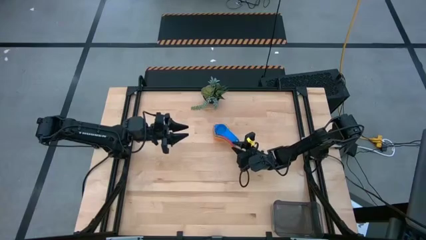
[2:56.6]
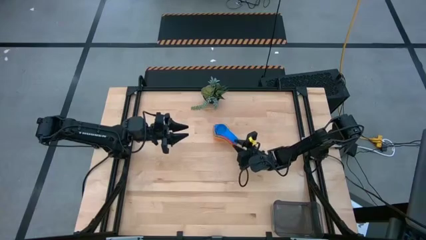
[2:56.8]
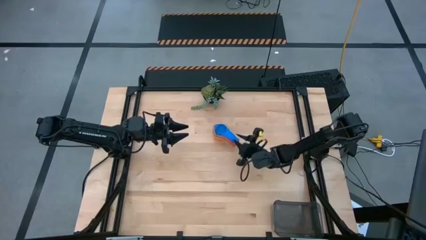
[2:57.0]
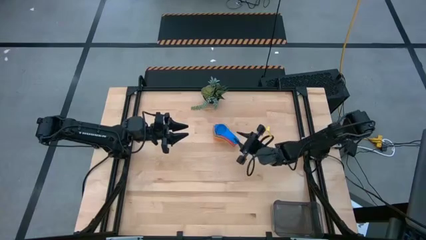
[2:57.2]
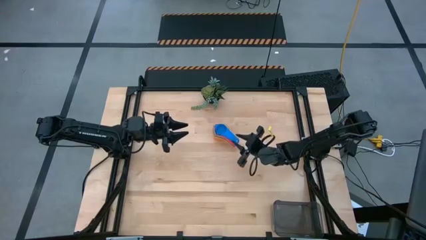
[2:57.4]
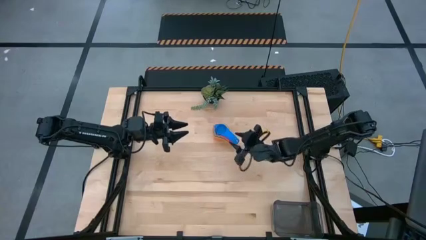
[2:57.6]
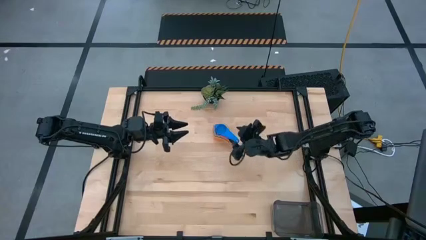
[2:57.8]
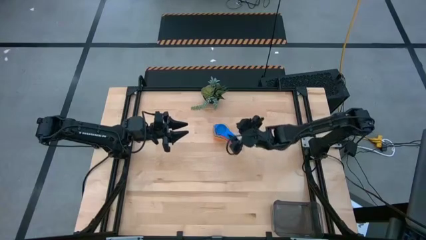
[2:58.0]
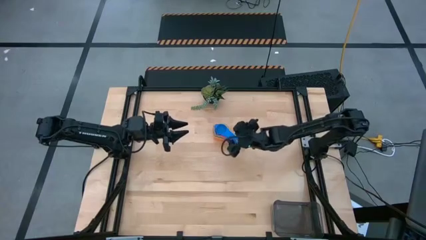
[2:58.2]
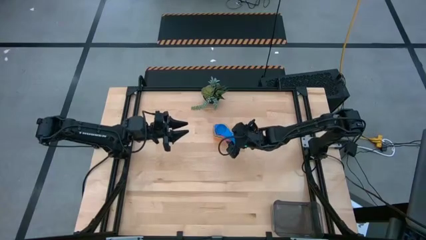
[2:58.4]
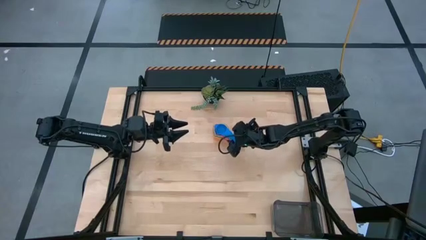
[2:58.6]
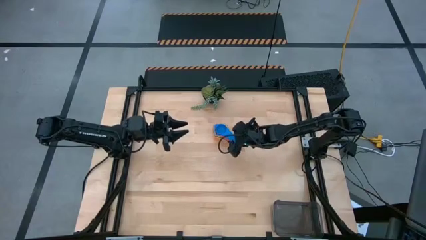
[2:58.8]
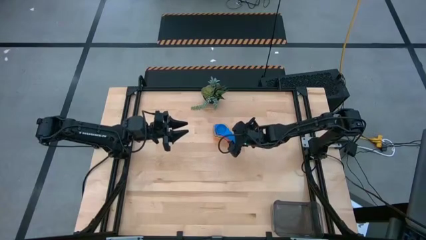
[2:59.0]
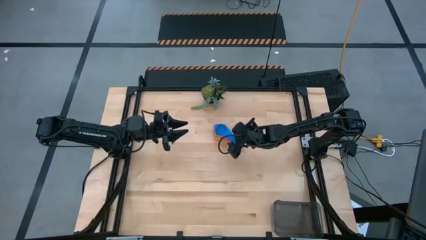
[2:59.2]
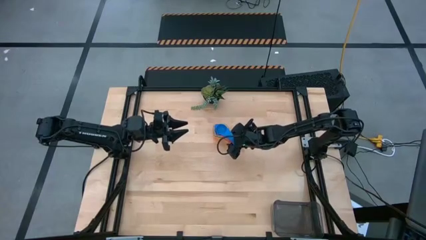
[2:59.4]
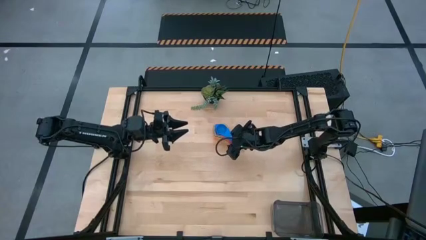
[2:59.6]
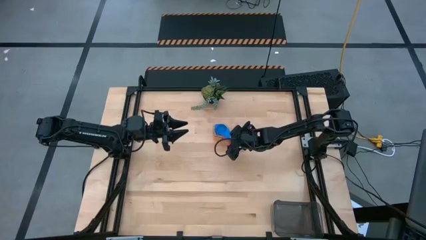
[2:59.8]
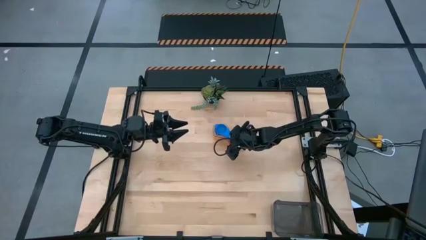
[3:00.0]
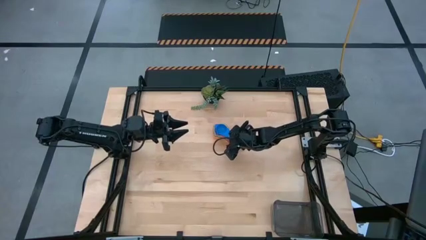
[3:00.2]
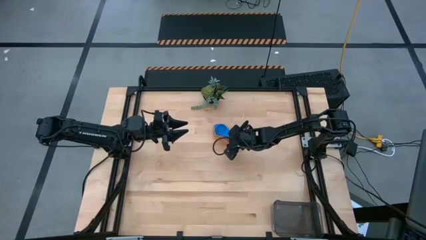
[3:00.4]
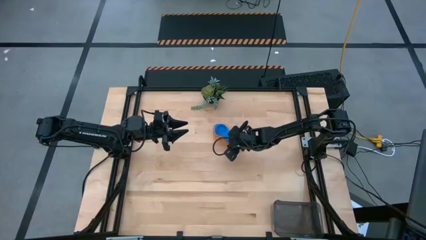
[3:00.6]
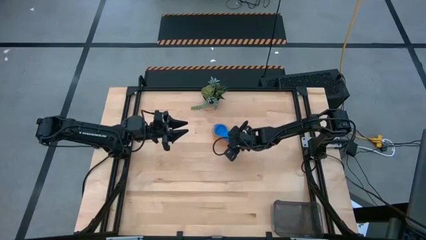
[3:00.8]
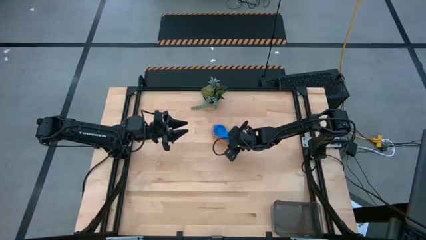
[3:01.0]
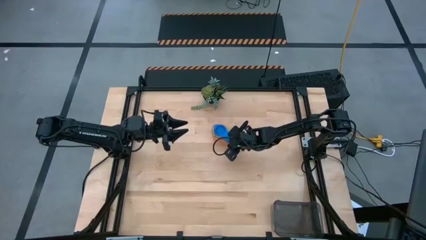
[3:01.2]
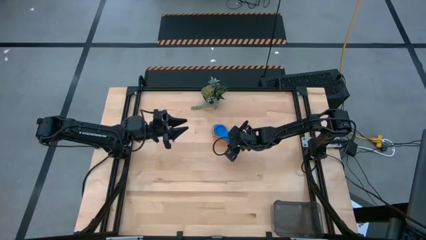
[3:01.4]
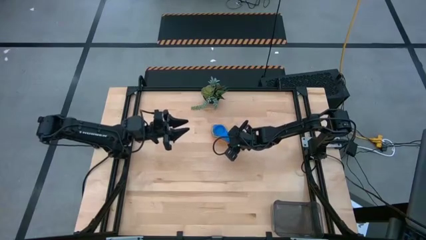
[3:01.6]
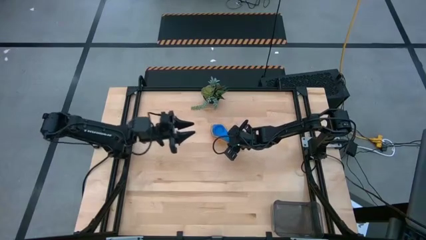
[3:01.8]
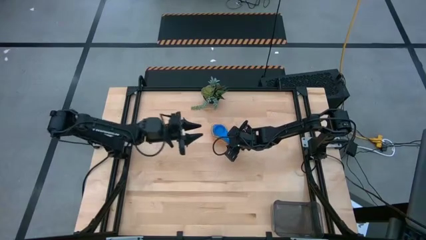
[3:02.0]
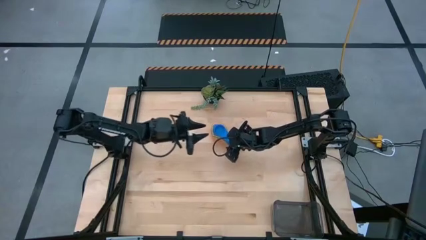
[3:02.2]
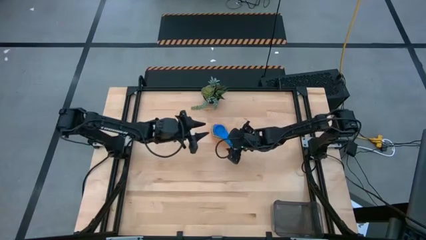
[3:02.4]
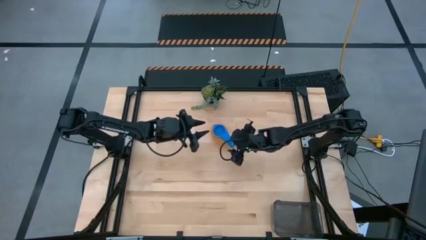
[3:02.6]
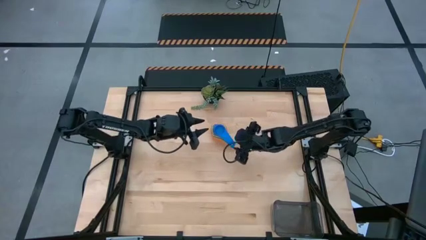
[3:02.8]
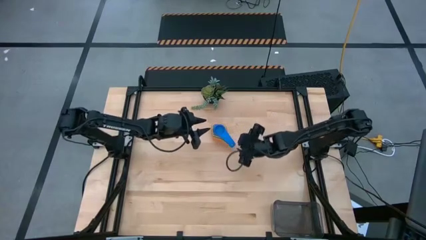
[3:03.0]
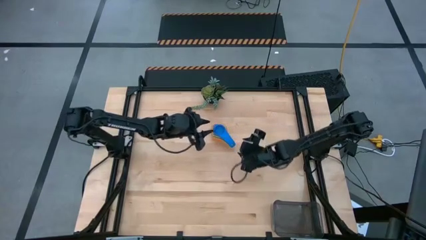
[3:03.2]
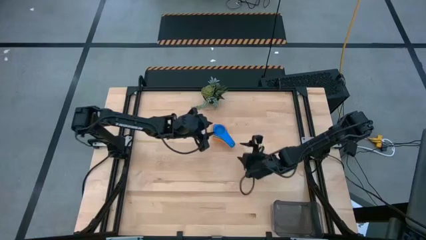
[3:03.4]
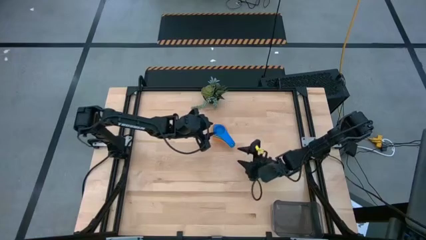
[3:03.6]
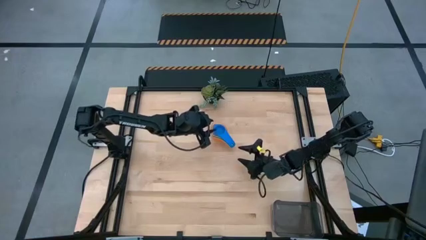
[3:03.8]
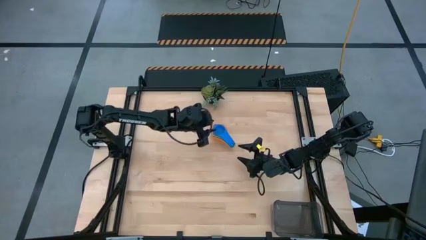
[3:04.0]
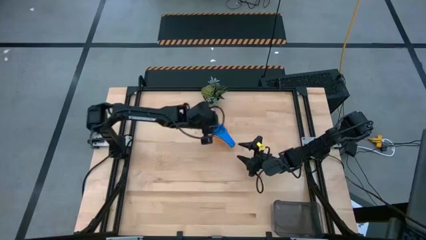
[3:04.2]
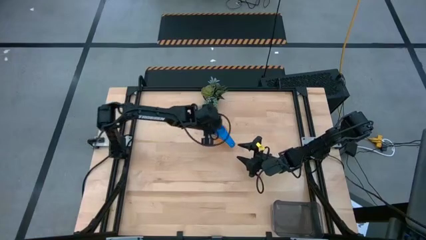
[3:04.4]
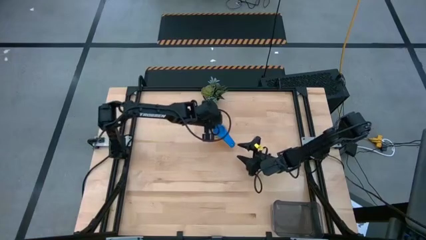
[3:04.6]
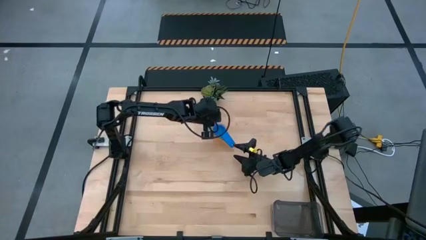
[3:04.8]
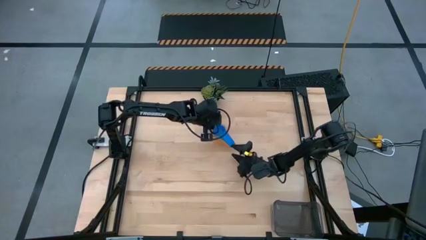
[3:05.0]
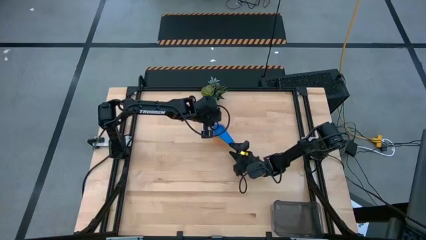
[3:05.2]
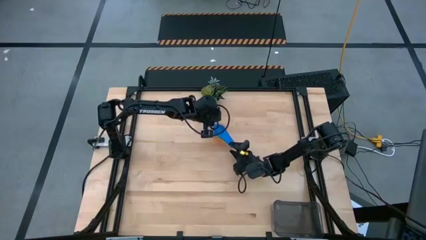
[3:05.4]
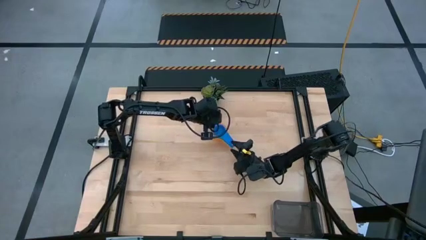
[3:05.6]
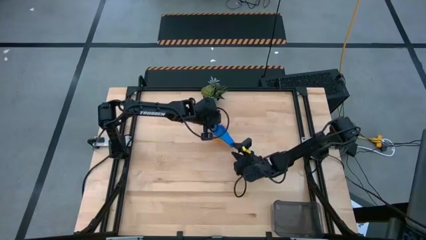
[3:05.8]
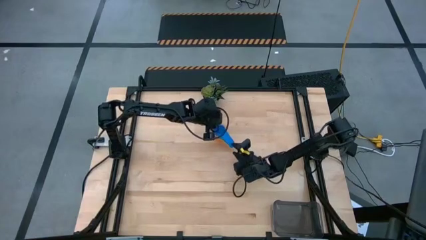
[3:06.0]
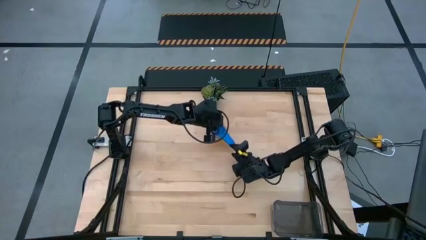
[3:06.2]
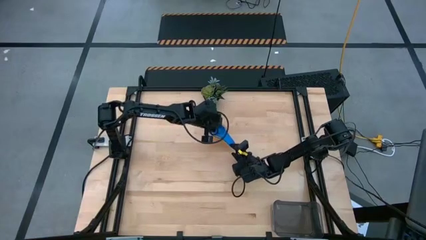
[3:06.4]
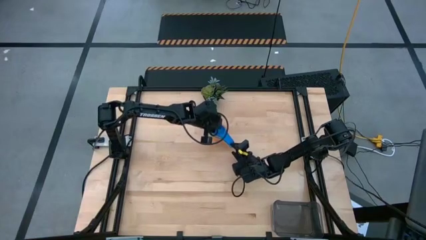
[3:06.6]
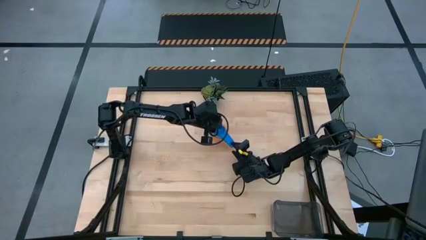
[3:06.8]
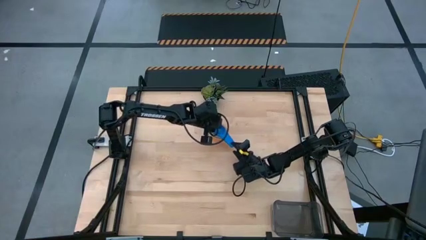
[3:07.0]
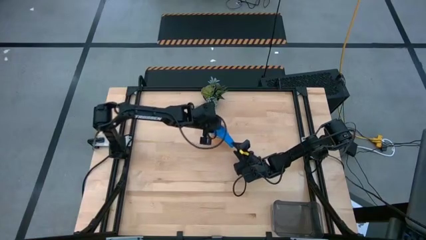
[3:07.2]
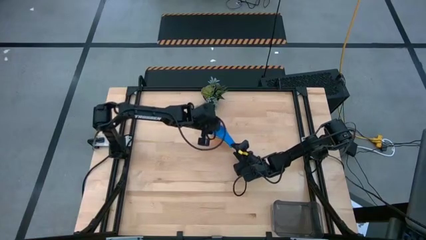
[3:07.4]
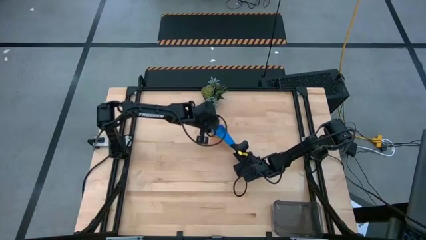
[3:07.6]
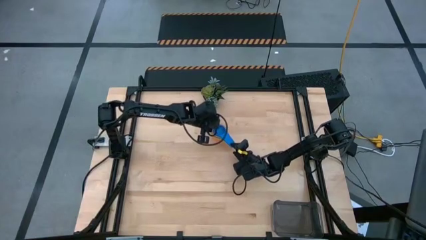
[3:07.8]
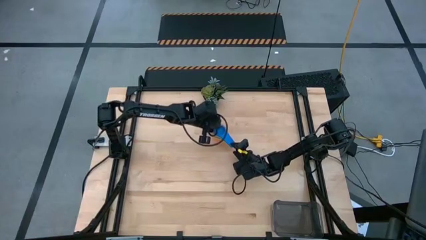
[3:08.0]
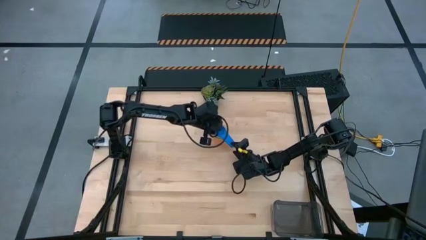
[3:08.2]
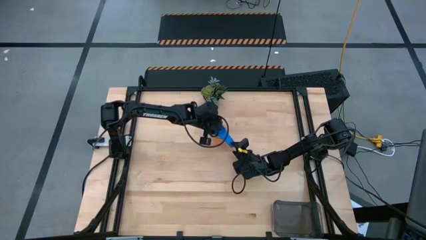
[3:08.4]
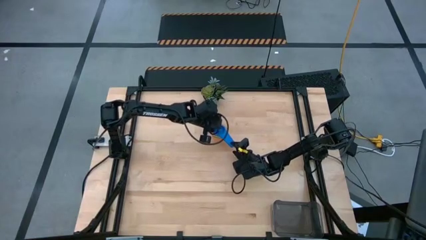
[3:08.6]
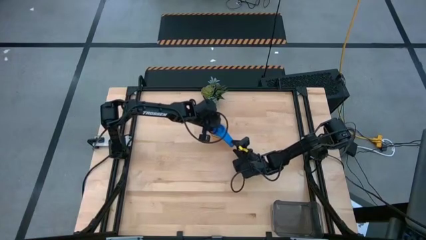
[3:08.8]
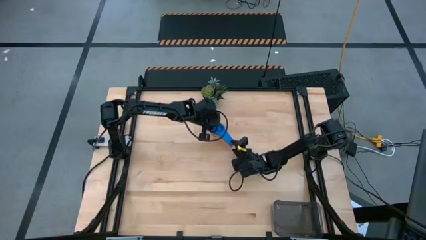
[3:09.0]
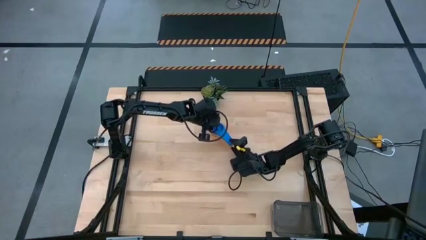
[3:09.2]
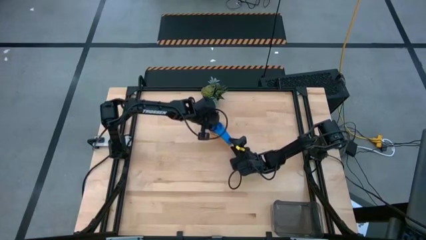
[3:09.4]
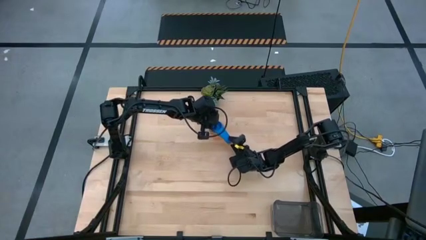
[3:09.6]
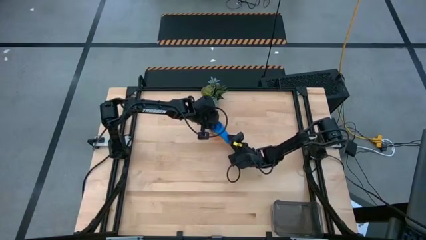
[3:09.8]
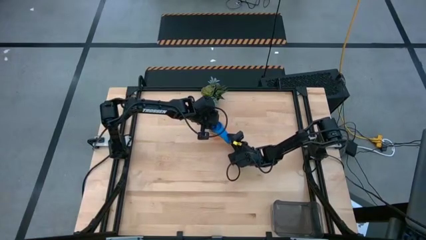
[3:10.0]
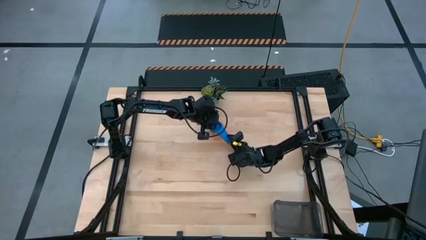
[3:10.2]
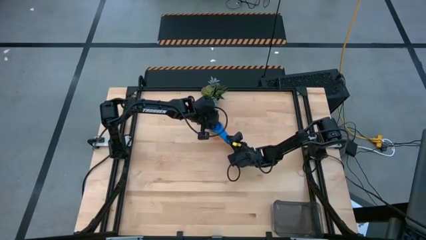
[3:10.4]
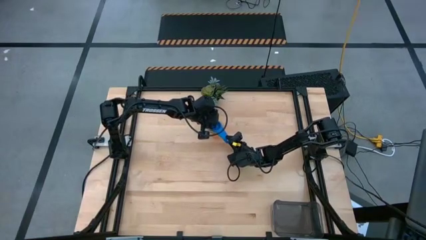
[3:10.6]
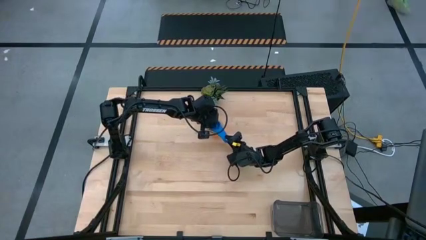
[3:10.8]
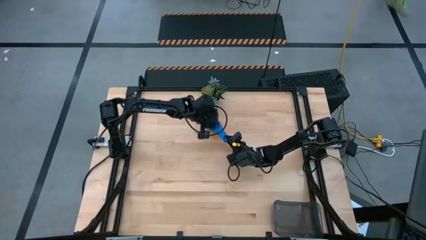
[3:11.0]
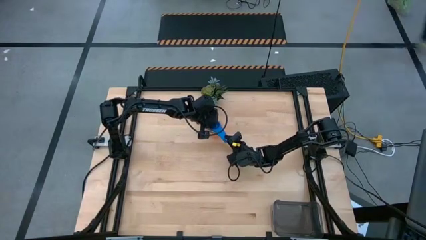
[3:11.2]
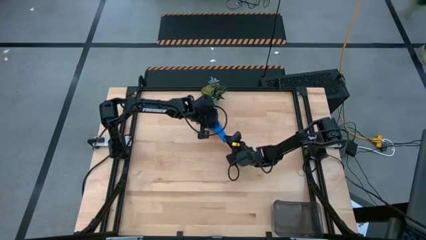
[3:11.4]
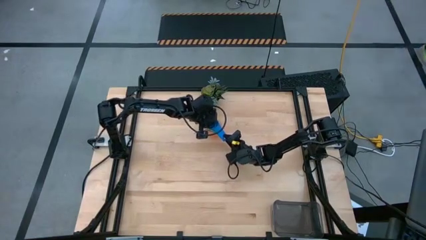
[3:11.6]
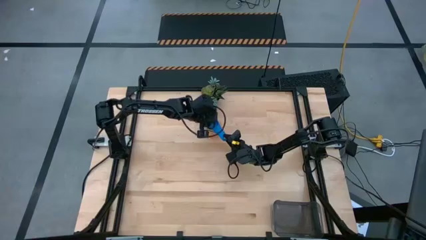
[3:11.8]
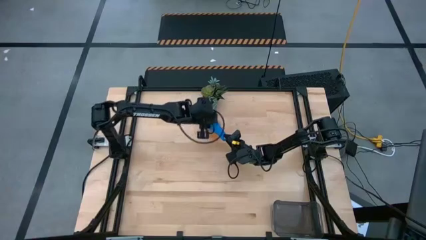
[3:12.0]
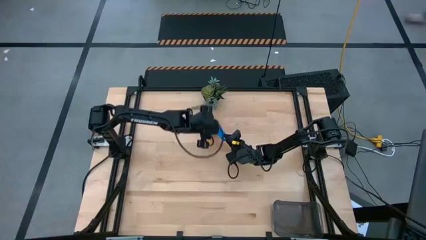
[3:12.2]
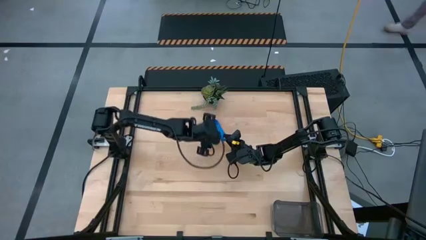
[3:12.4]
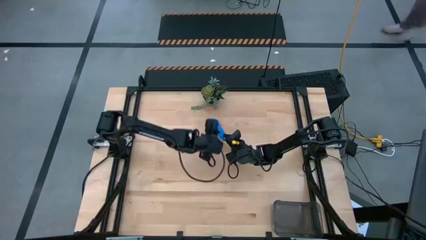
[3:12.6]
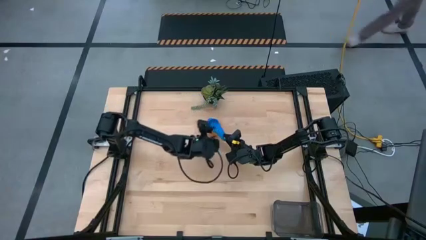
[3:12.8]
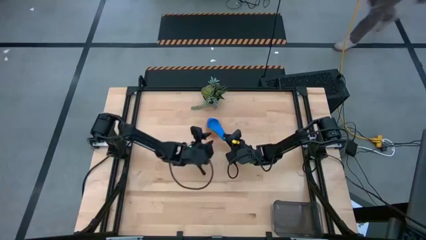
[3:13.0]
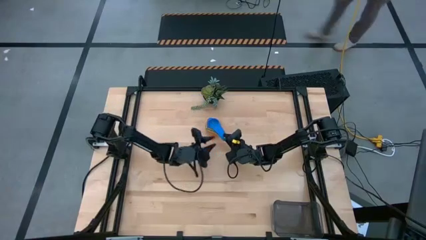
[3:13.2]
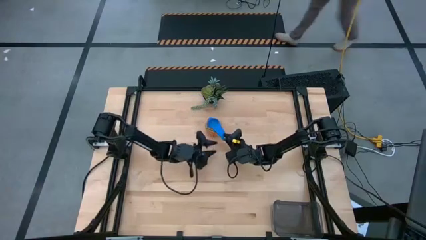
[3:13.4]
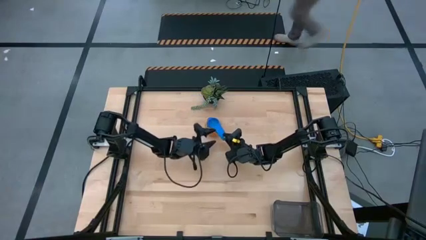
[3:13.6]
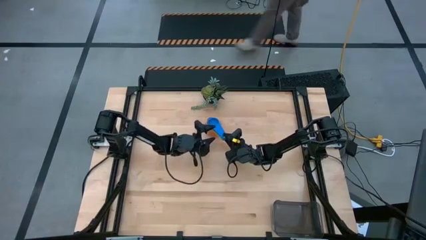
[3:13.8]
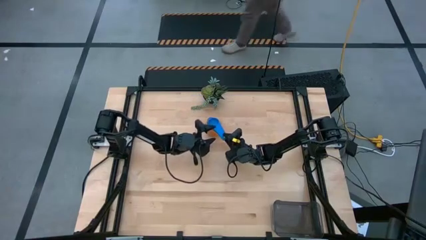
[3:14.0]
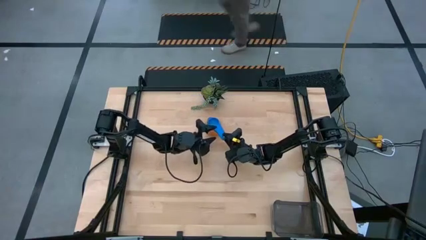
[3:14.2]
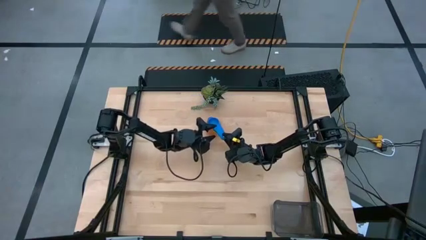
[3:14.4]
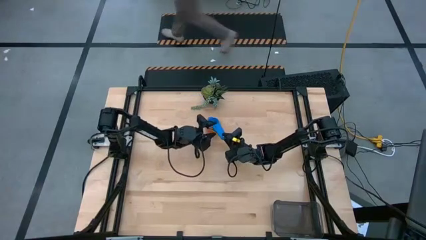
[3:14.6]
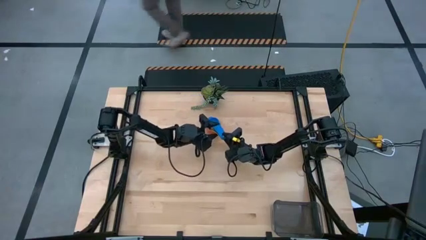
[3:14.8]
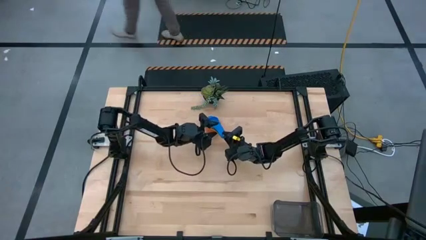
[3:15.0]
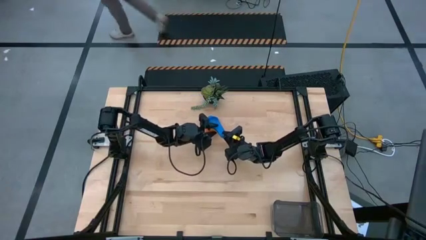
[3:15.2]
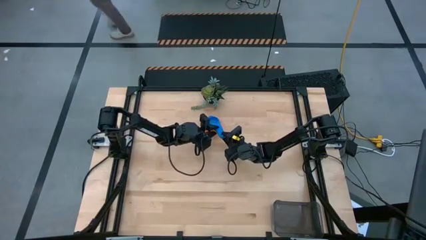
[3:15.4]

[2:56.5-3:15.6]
Task: Nest measuring cups in basket
Put the stacked measuring cups into the black transparent bin
